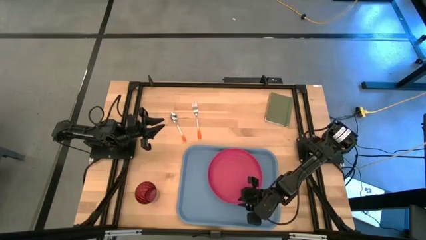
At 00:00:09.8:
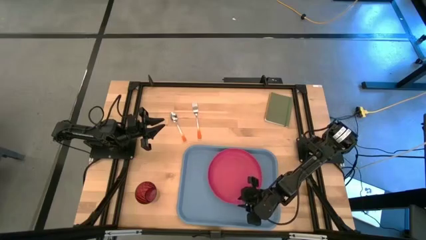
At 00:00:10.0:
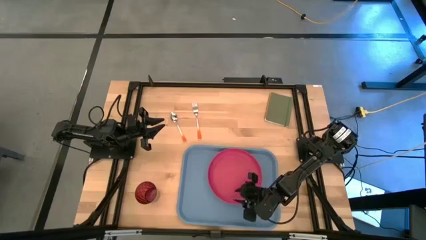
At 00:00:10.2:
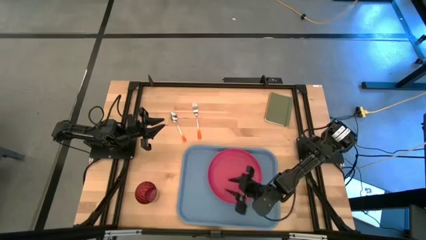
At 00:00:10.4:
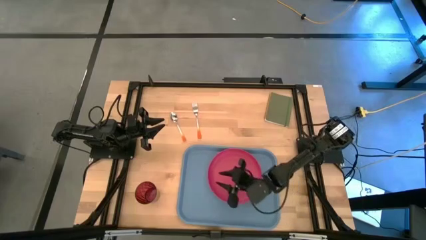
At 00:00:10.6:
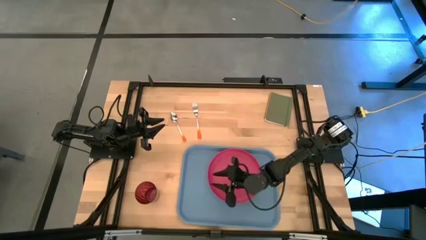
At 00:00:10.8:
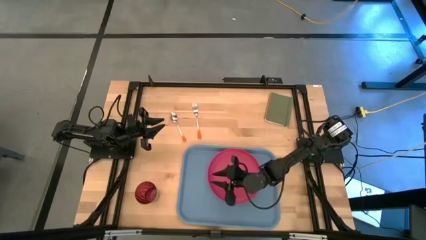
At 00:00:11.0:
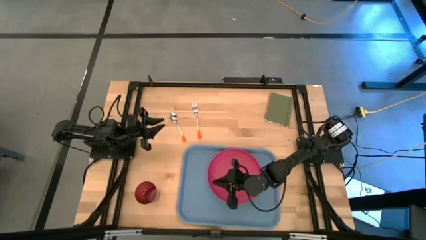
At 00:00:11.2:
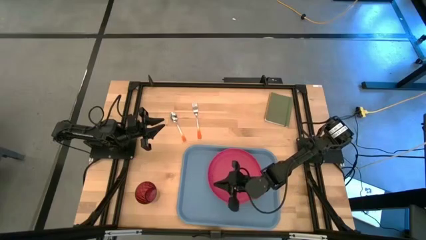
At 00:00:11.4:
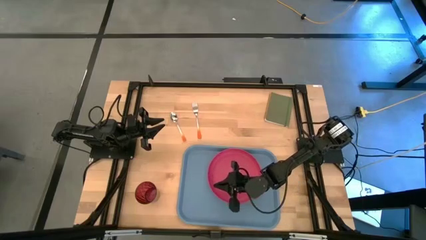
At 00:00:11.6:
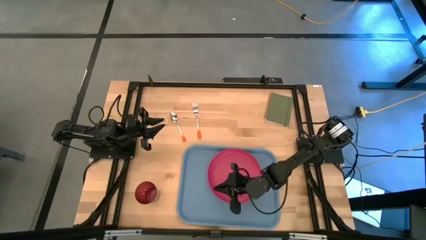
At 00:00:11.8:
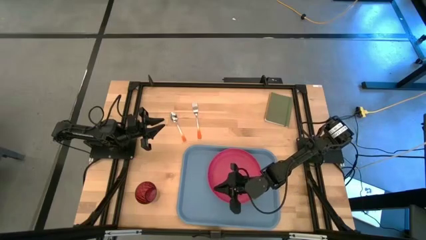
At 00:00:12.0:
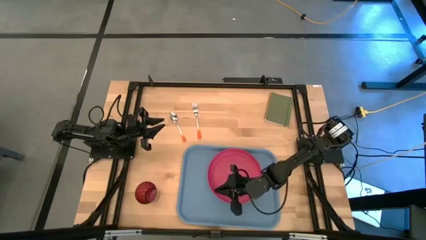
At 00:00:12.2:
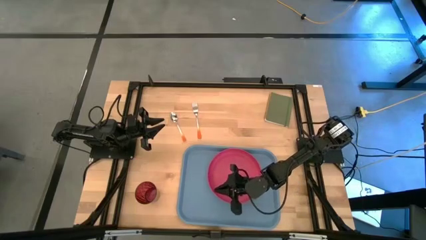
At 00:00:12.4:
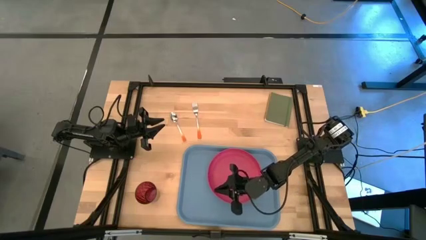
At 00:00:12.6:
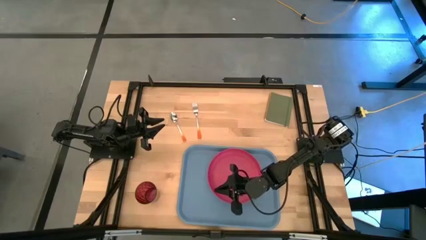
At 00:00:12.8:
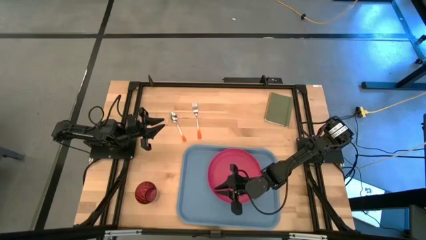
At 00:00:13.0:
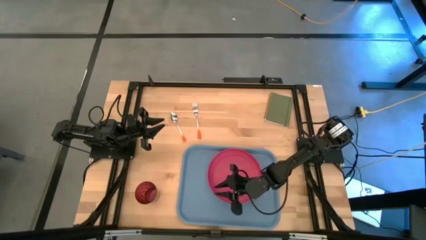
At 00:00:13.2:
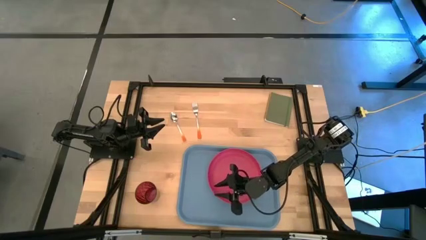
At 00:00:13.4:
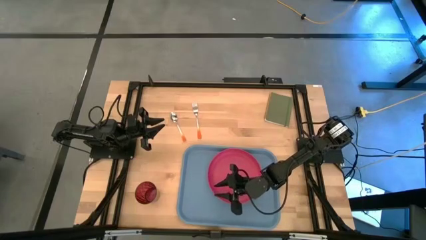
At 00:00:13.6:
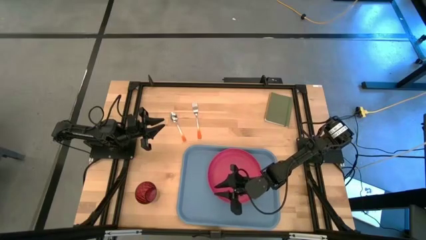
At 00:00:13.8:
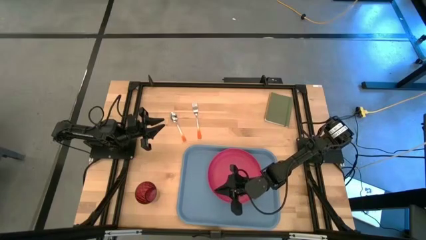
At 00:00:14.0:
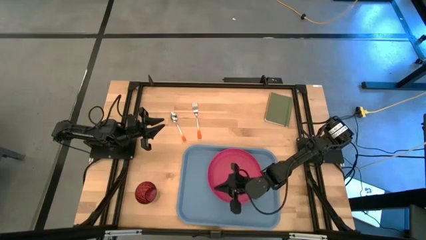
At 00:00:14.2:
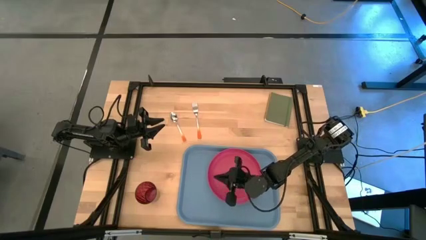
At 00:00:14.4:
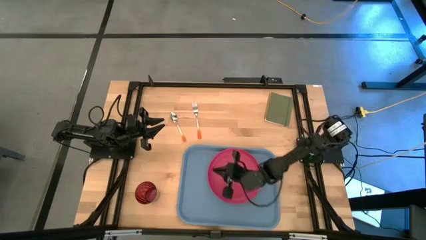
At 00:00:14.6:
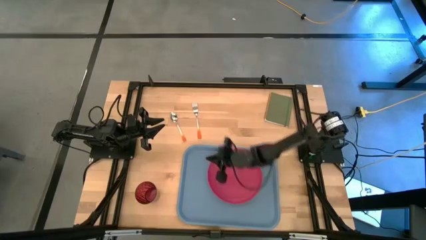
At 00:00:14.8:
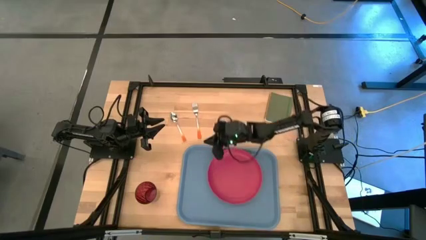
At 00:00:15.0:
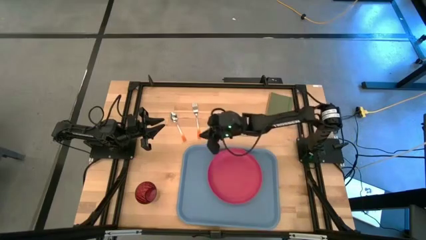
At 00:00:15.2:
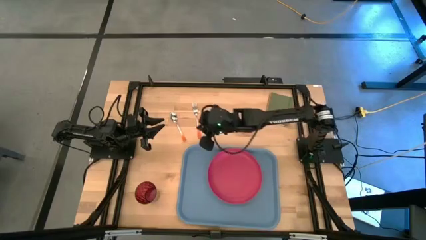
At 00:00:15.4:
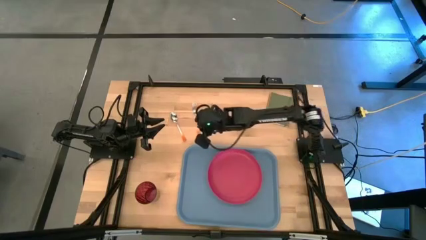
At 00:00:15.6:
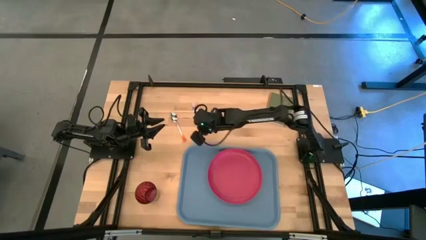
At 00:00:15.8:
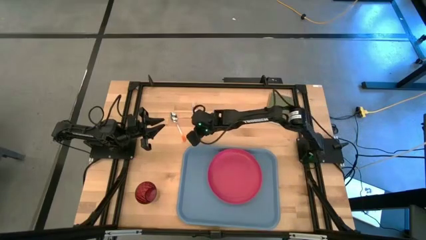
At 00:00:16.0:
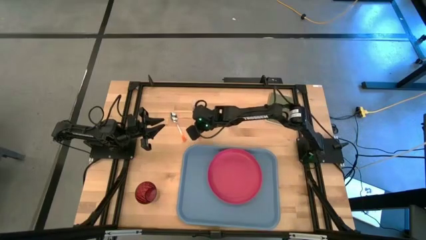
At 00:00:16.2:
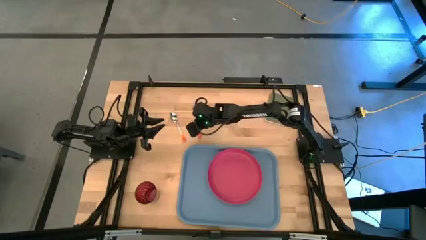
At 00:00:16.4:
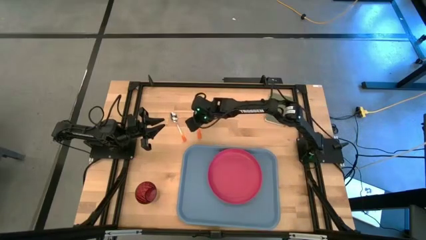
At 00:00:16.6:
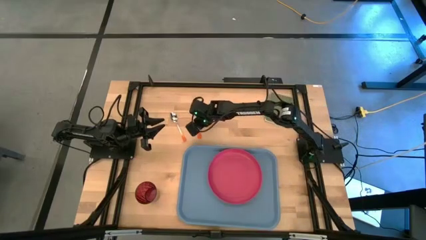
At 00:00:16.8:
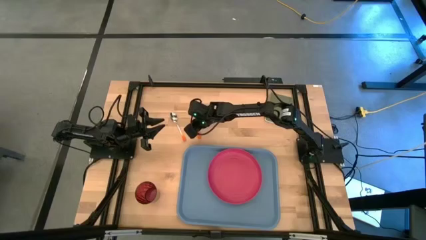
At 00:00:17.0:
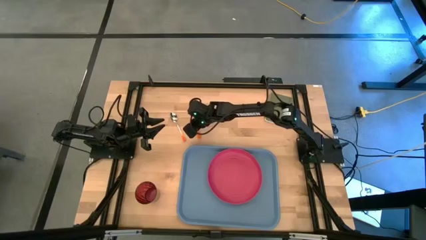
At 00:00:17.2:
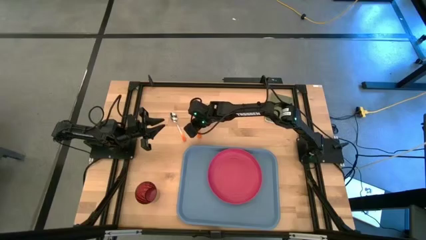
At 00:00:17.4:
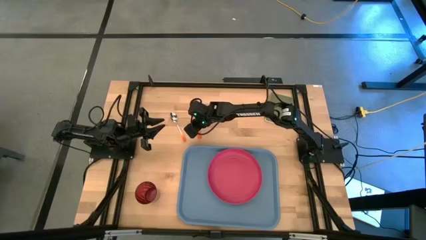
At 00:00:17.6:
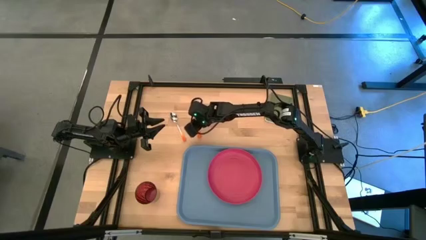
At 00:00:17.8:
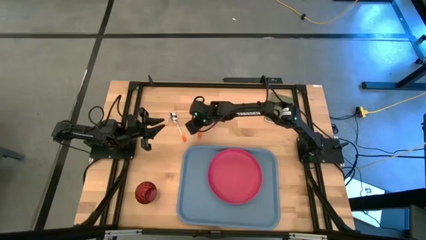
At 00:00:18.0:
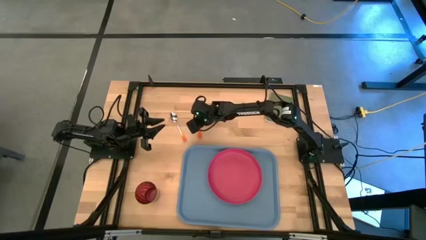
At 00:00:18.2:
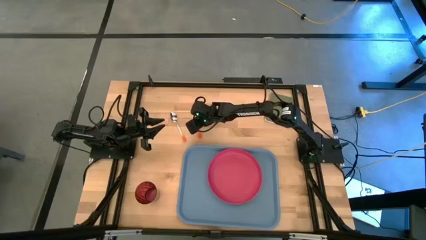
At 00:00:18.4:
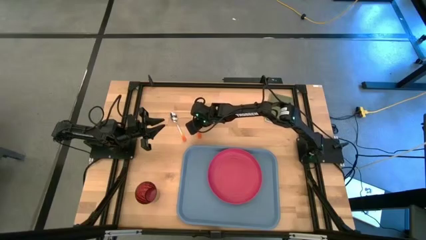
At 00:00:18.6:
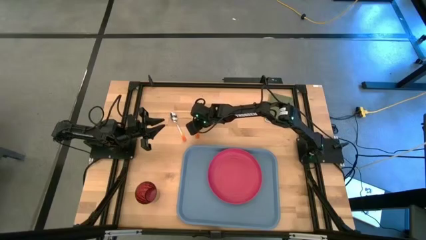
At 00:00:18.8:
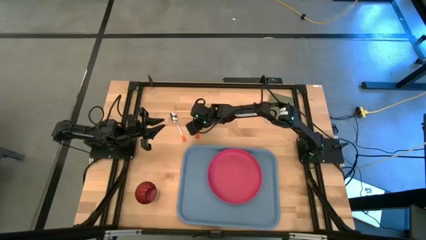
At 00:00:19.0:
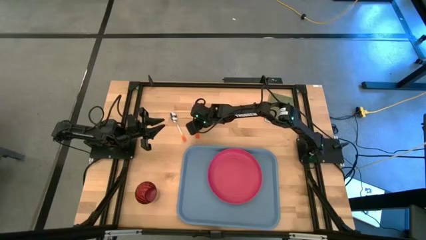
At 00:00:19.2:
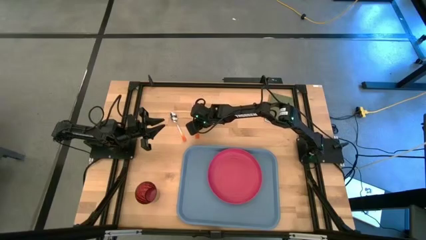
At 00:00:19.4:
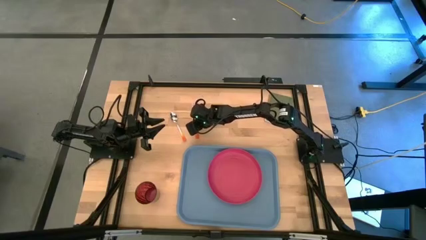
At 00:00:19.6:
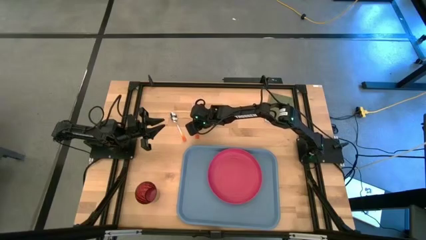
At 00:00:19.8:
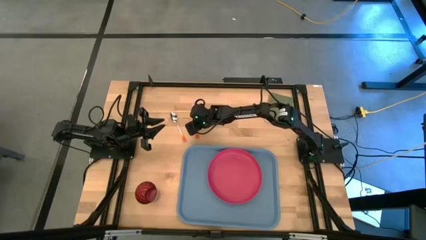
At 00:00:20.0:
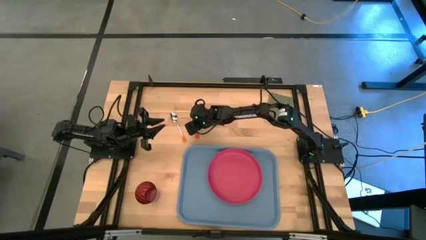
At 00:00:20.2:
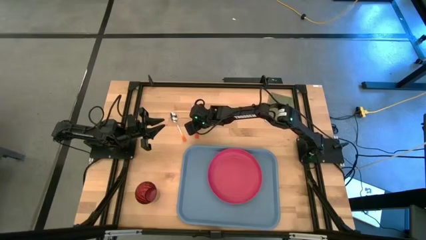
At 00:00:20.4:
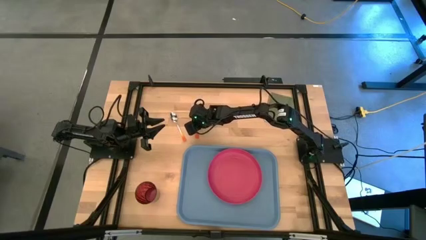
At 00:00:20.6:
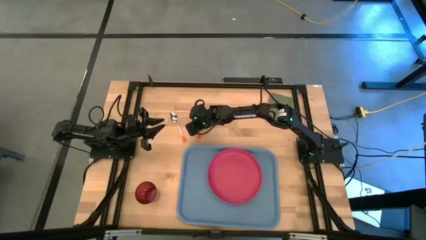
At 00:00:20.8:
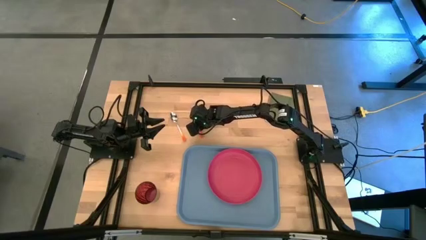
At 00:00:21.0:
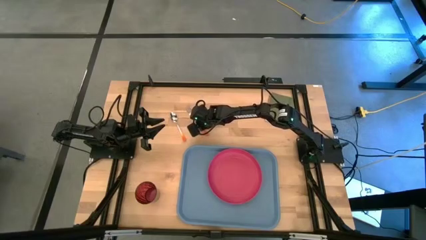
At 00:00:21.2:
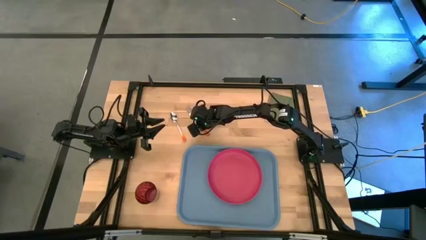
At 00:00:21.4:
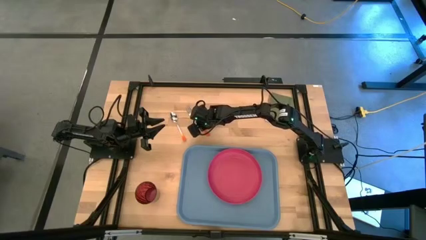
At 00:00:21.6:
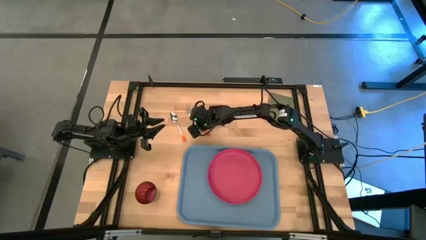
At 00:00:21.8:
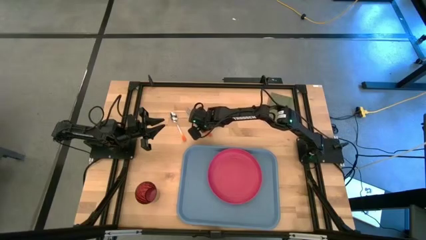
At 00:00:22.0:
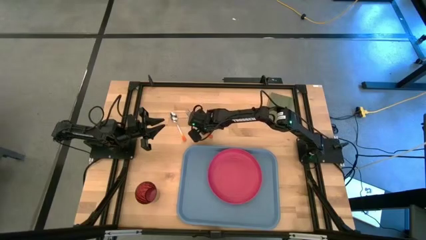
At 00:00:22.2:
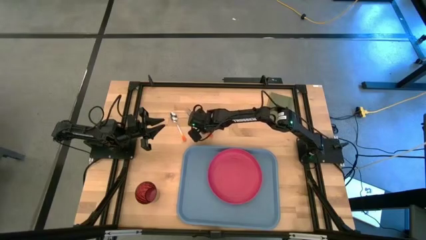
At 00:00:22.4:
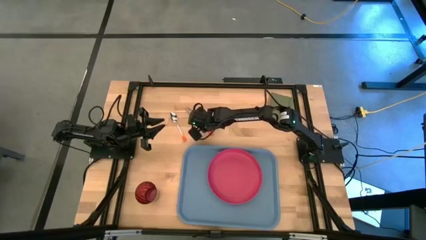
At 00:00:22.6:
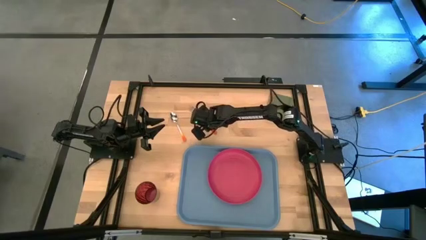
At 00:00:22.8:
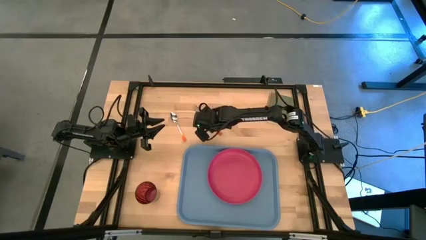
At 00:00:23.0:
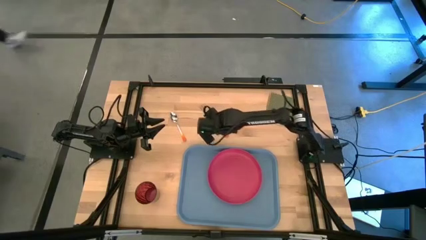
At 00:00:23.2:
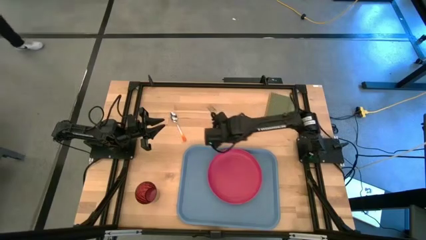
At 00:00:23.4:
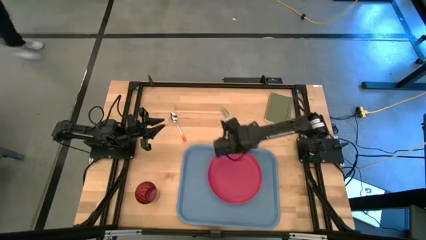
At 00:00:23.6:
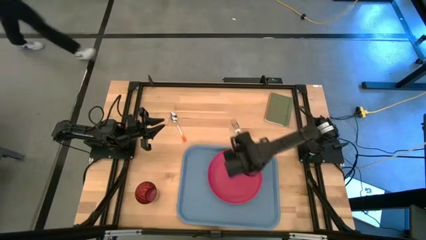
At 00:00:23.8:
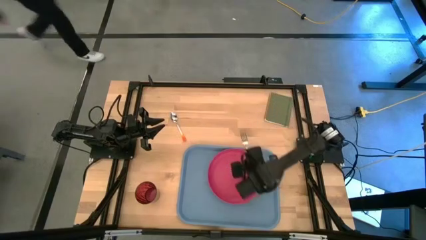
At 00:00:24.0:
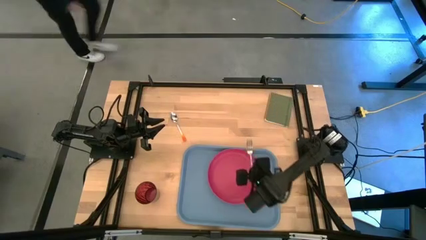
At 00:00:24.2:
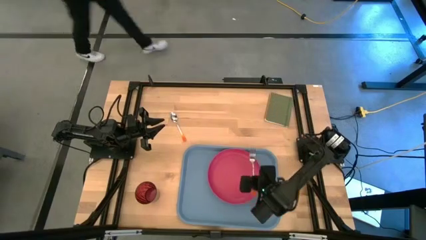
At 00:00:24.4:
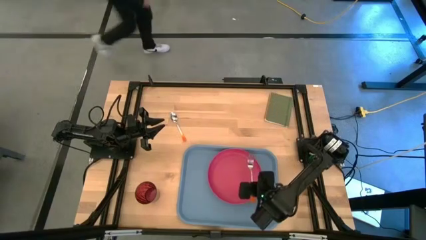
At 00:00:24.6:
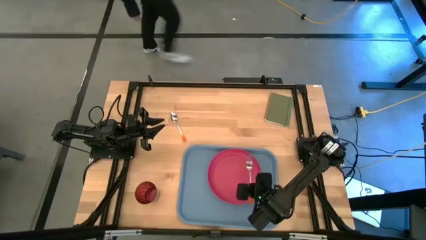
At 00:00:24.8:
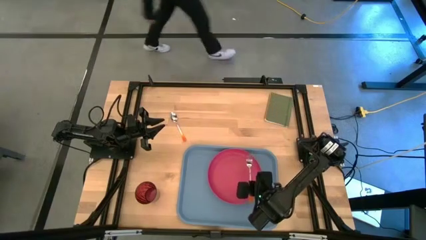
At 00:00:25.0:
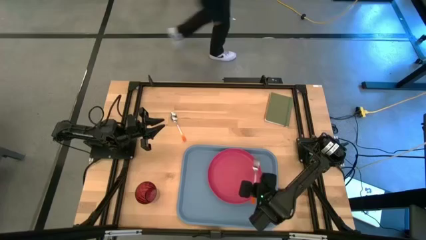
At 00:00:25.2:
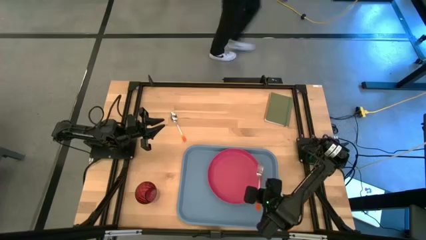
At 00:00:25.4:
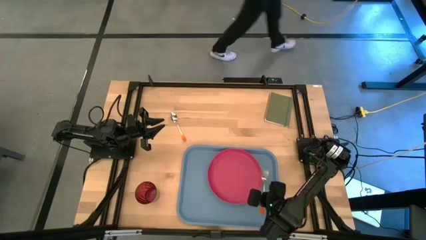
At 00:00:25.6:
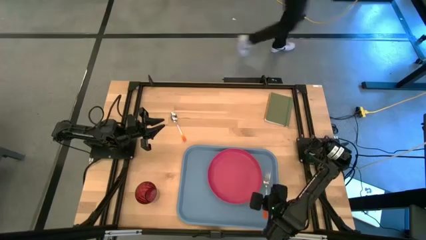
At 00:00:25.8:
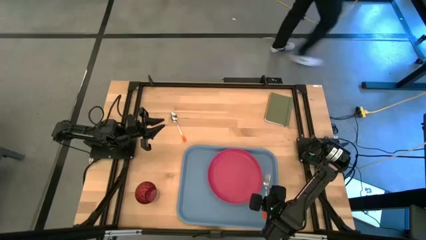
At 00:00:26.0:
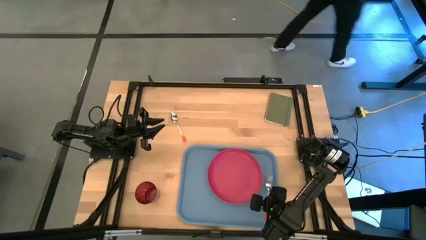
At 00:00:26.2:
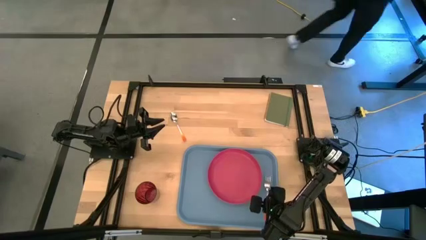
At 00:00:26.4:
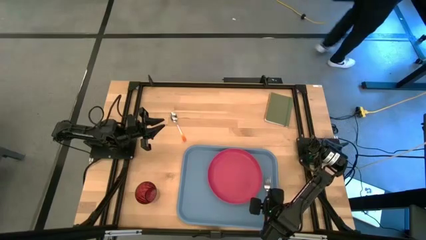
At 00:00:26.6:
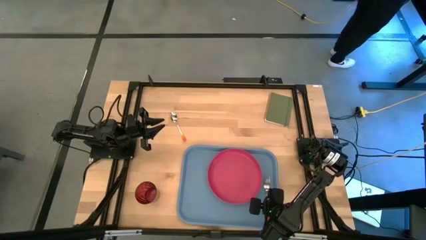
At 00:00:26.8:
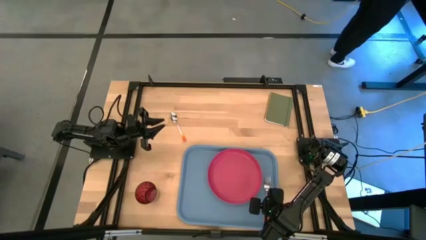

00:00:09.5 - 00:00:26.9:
Task: Pick and place plate/cup/fork/spoon on tray
Put the orange fork to the right of the pink plate on the blue serving tray
